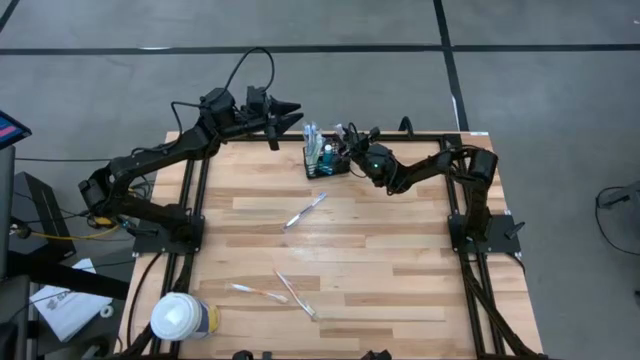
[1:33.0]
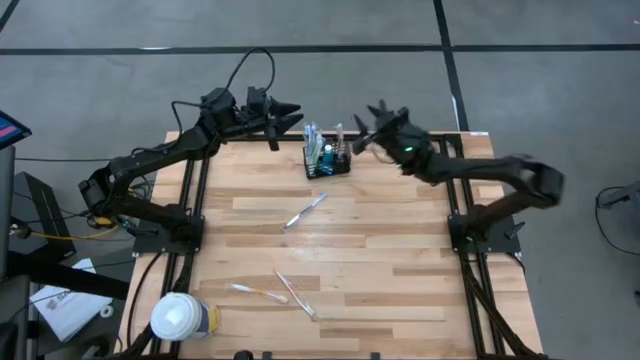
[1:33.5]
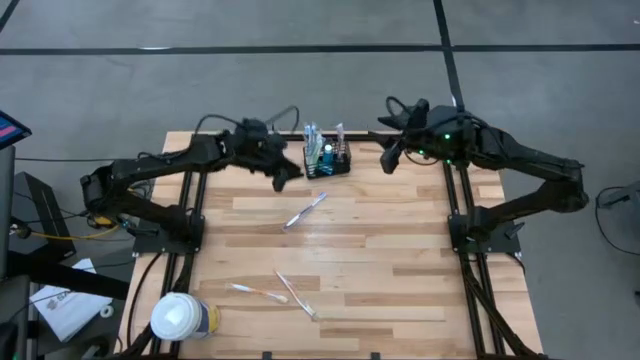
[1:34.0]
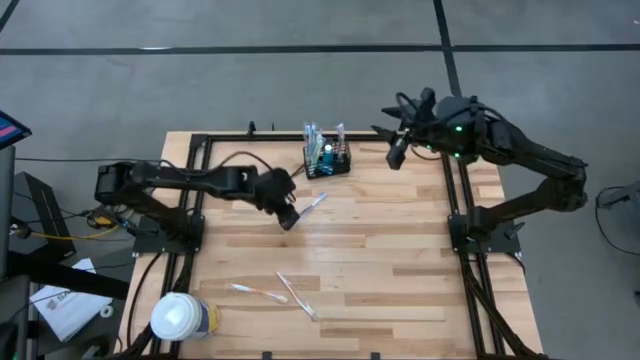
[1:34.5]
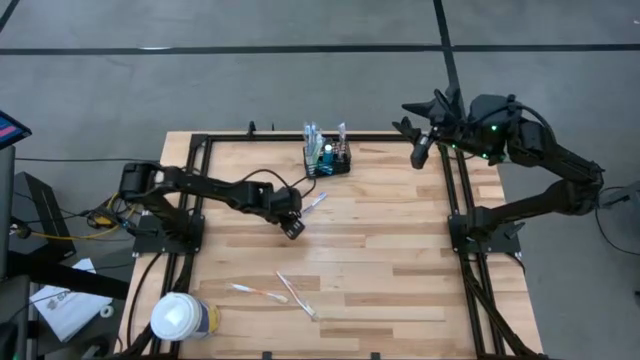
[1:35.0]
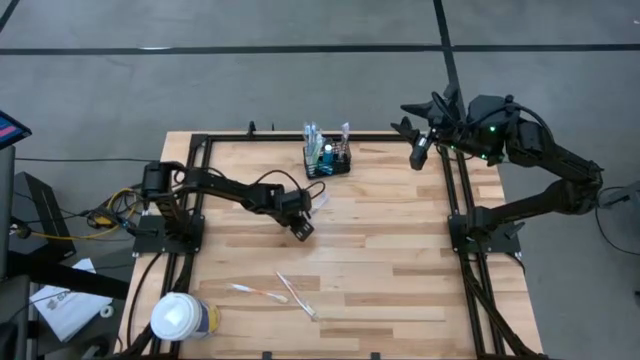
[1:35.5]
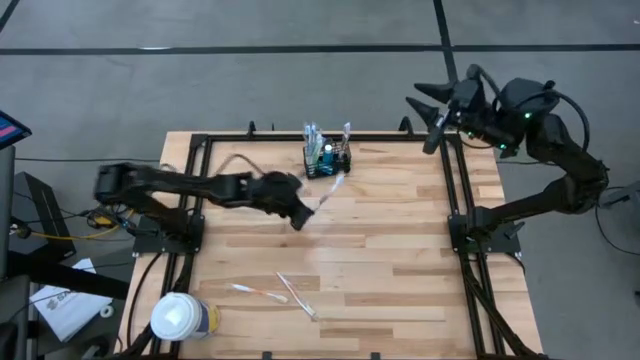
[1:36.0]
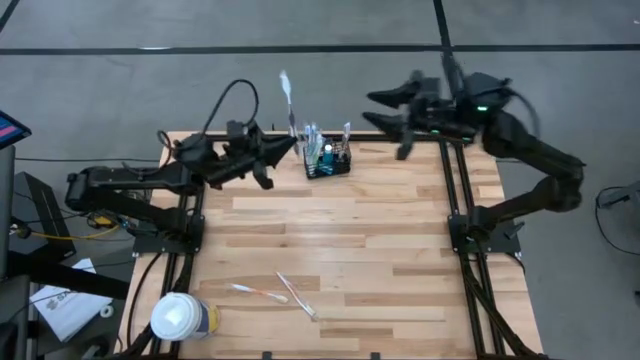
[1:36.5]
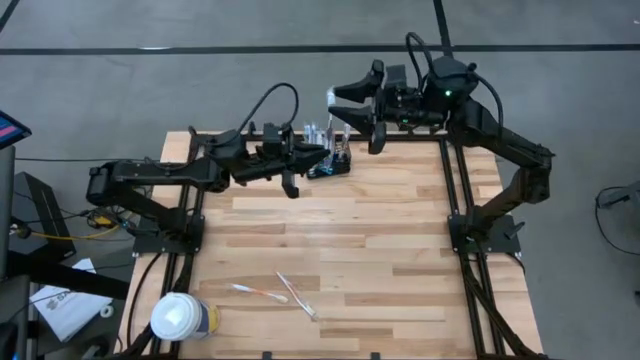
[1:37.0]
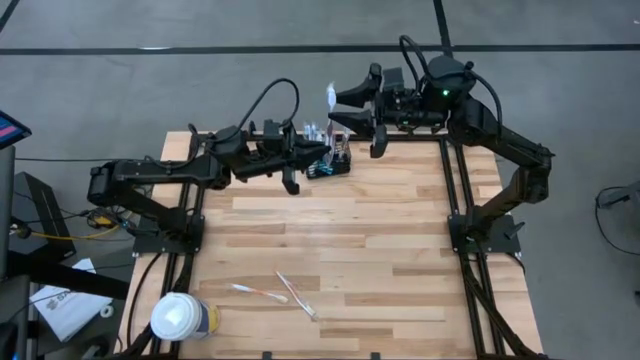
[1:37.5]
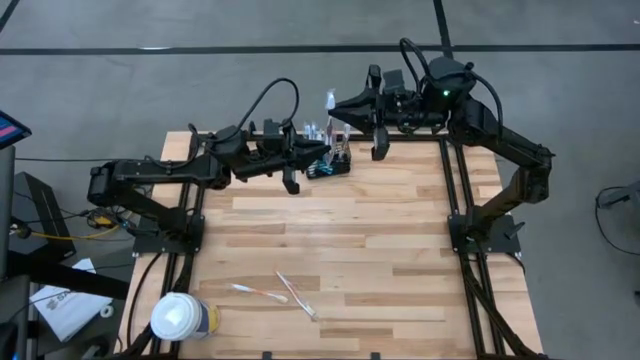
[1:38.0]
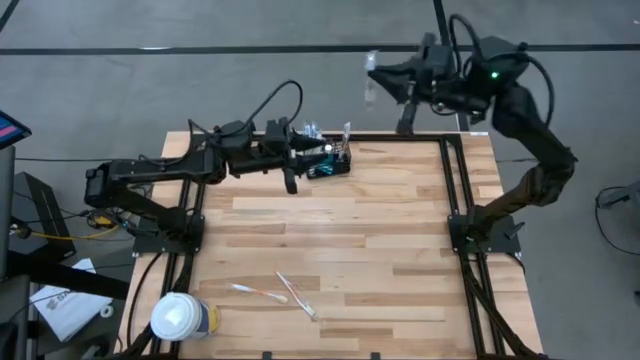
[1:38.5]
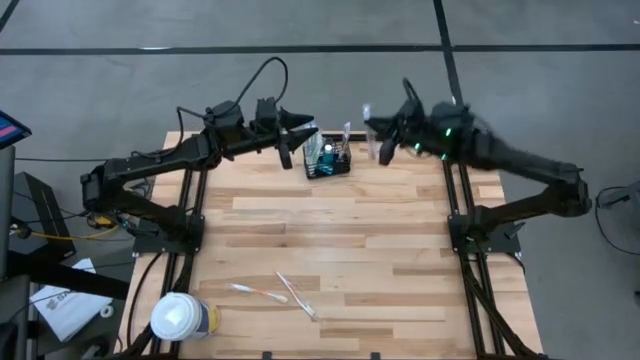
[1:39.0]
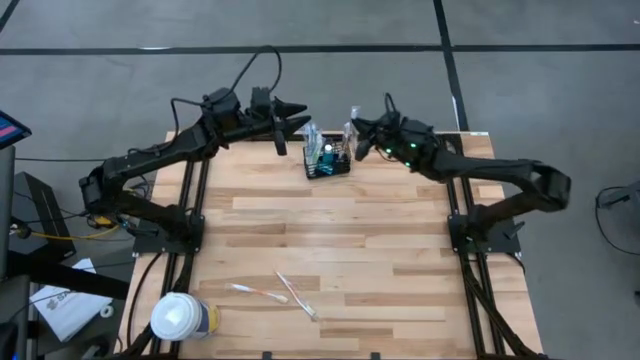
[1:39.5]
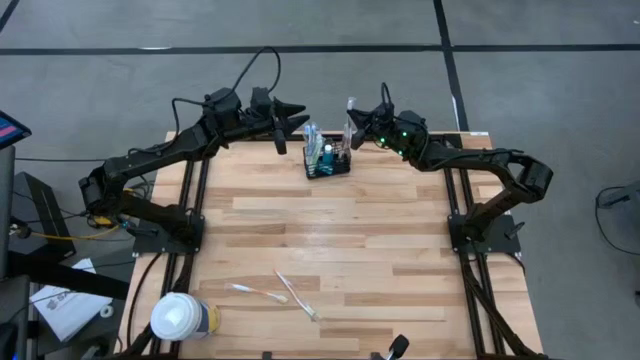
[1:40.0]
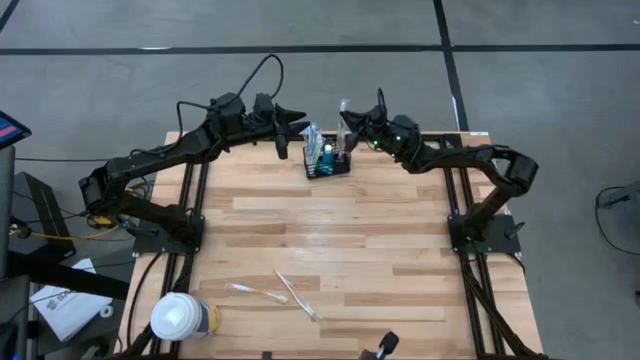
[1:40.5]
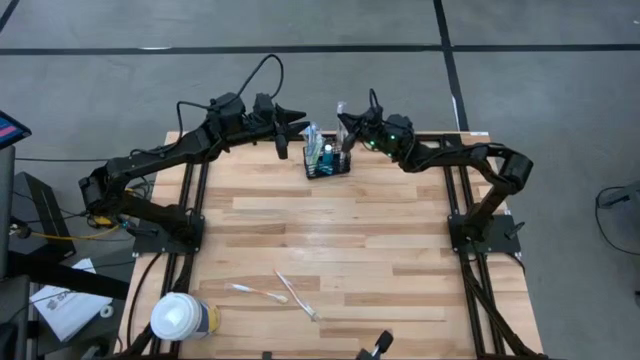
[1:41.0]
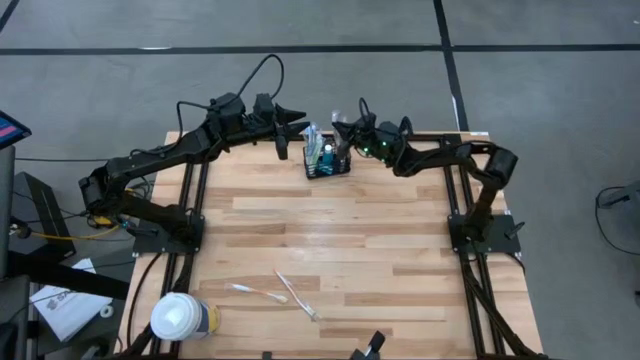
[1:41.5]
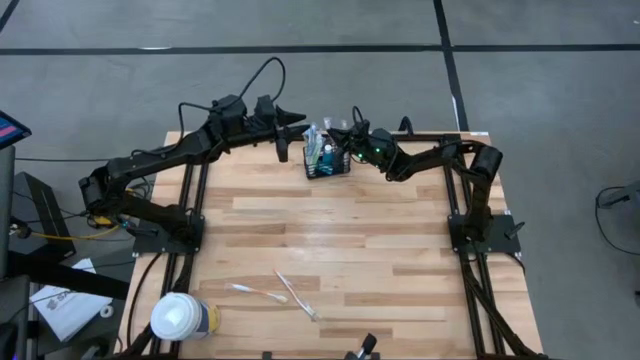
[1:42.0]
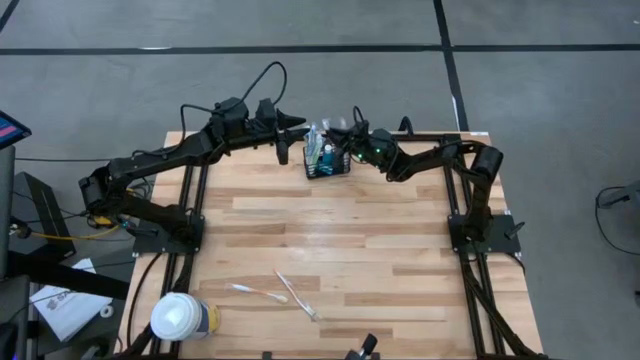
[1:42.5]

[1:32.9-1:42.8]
Task: Pick & Place toothbrushing station
Put the purple toothbrush into the black wire organizer

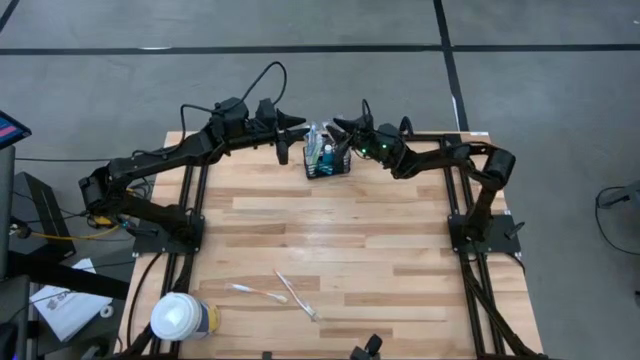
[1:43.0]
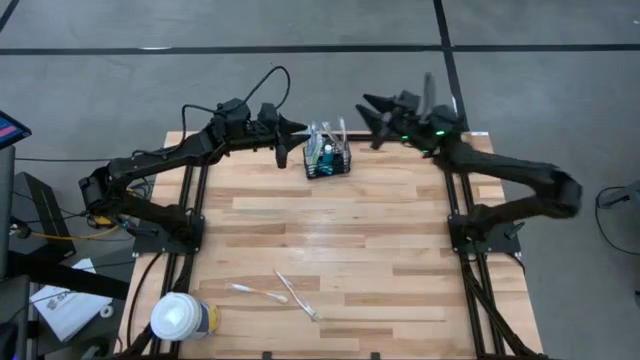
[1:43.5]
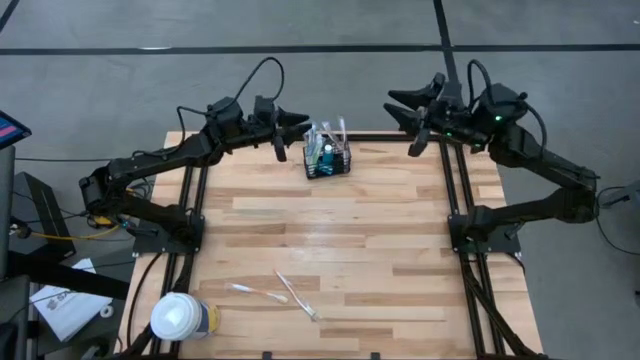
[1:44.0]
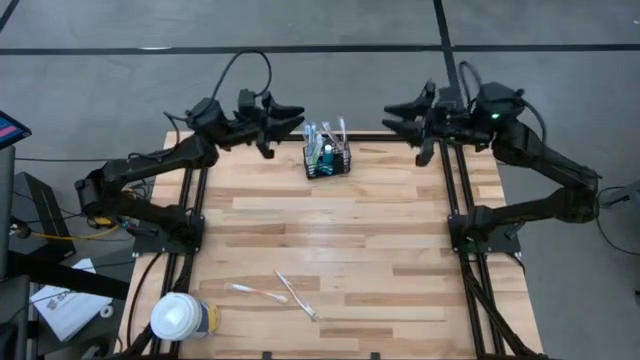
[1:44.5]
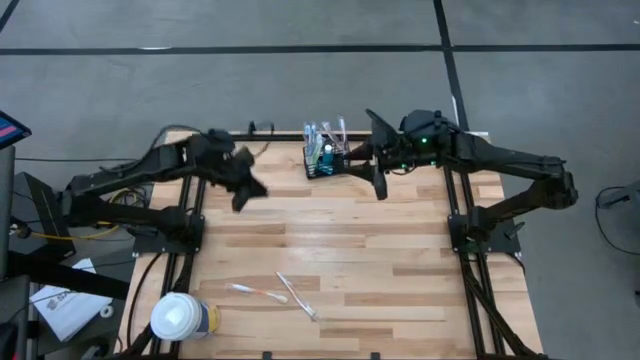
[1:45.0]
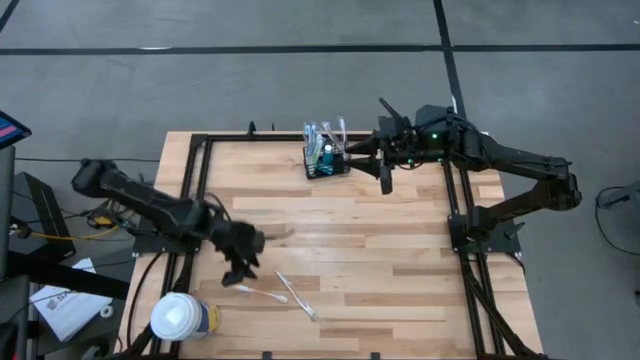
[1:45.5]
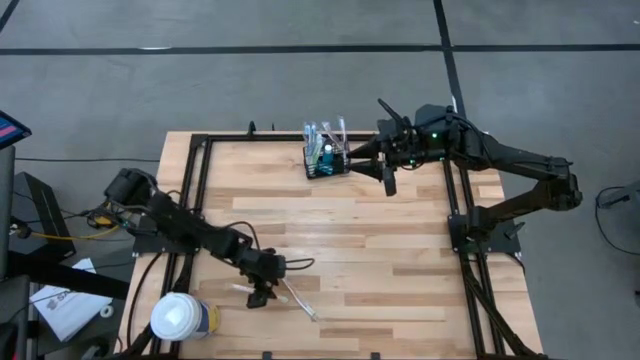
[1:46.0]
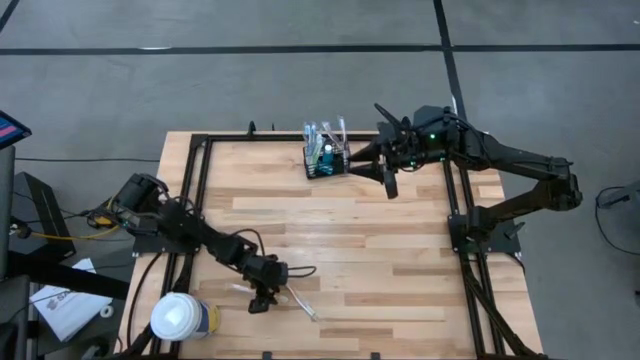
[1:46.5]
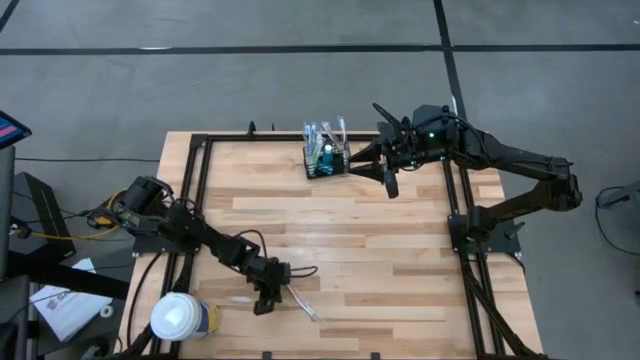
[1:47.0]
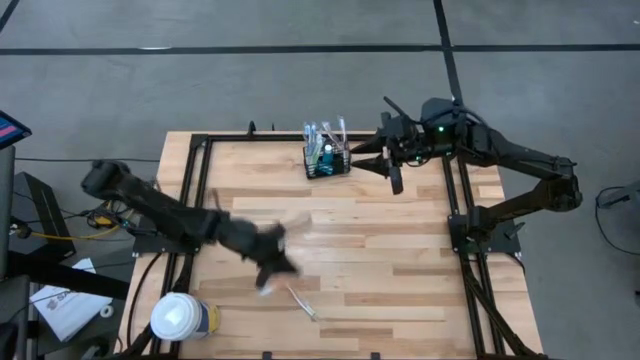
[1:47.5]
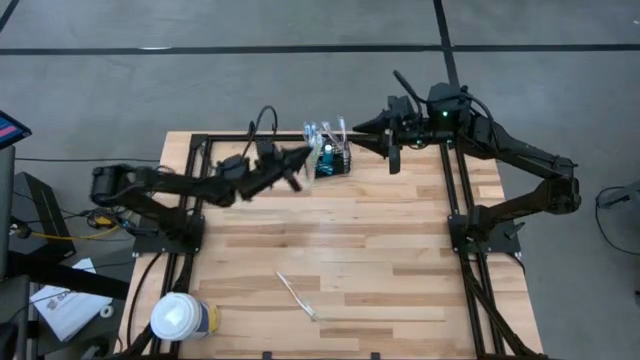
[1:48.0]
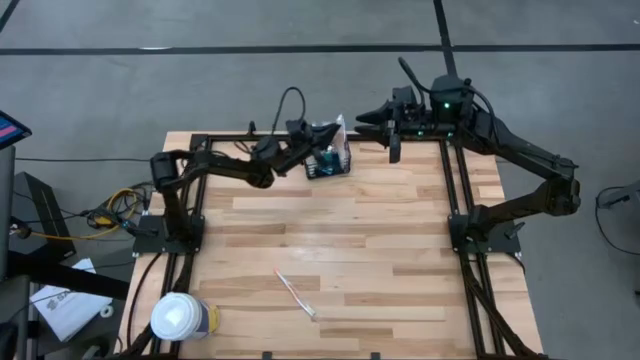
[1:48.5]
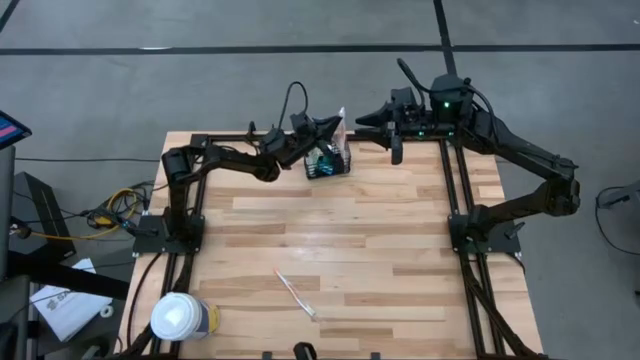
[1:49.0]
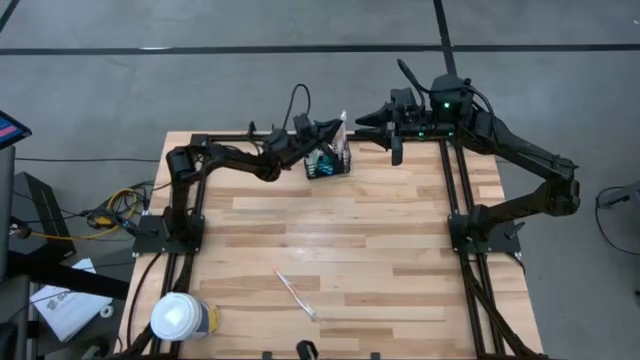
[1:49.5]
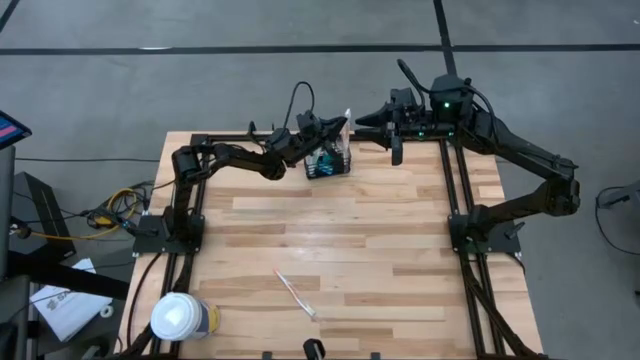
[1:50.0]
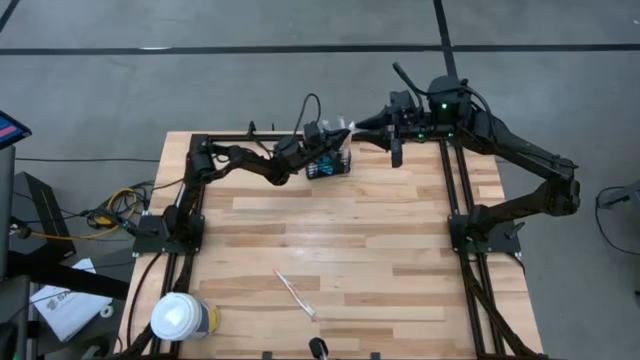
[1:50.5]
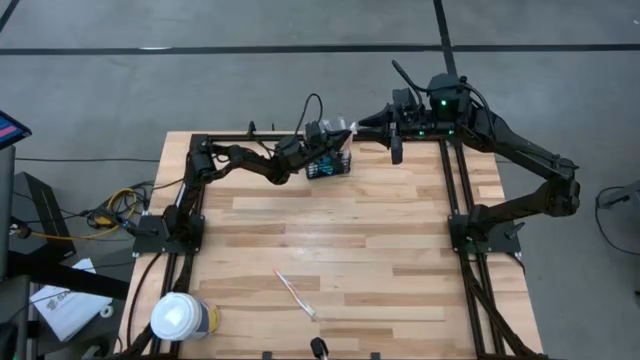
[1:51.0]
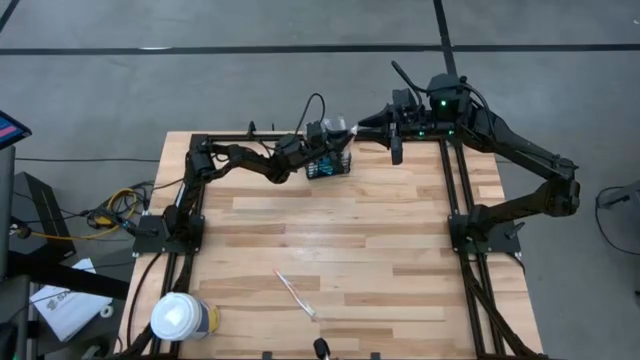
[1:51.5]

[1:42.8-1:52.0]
Put the left orange toothbrush into the black wire organizer

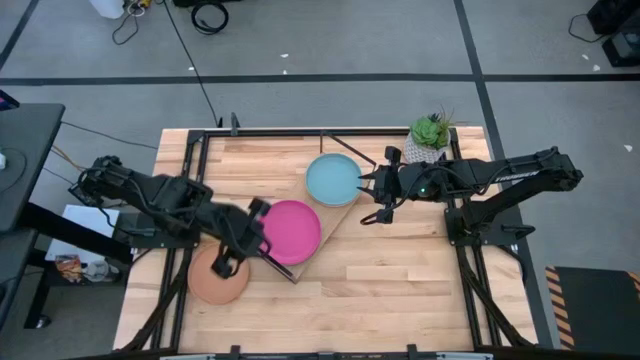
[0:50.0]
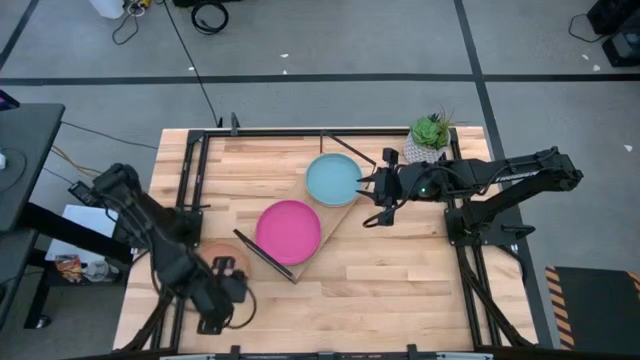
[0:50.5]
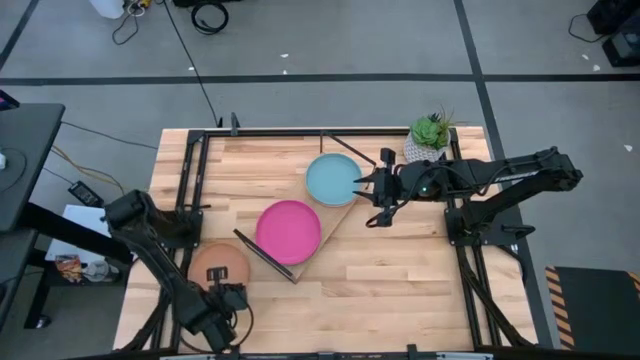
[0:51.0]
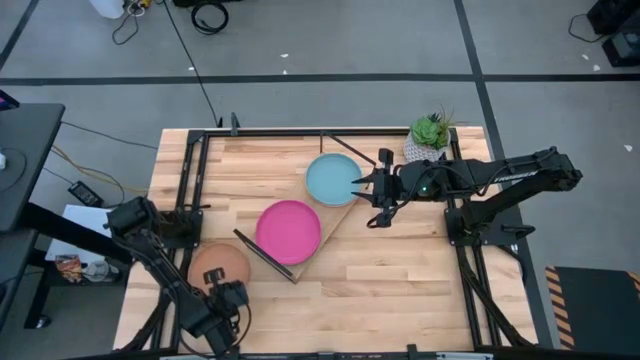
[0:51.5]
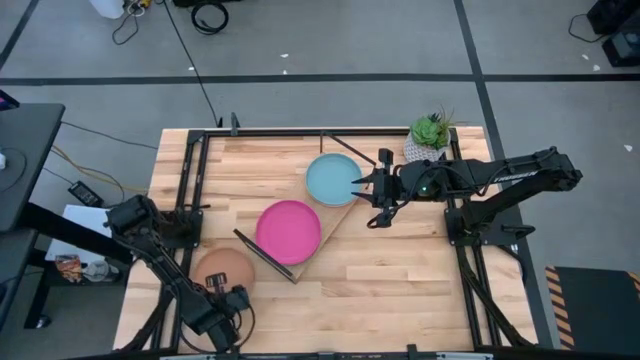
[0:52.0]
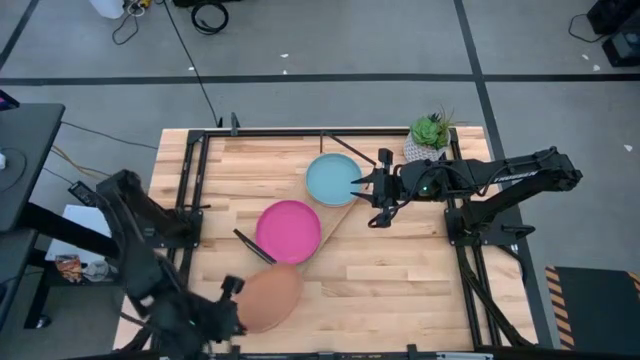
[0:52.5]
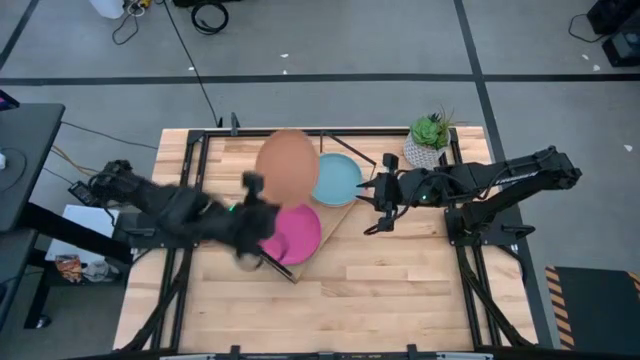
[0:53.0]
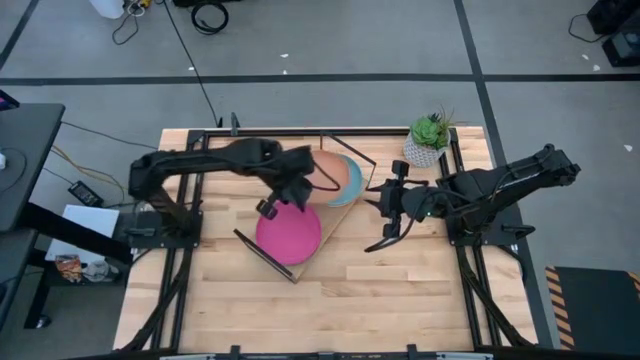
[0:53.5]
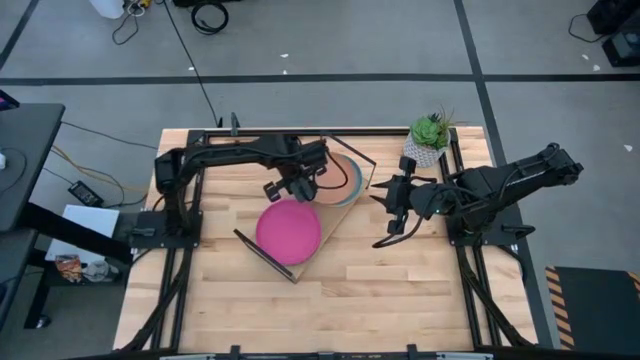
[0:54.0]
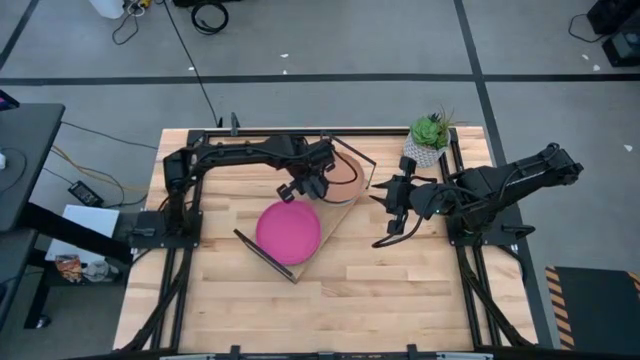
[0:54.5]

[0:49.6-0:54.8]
Task: Place and stack plates onto a shelf
Stack the brown plate on top of the light blue plate on the shelf
